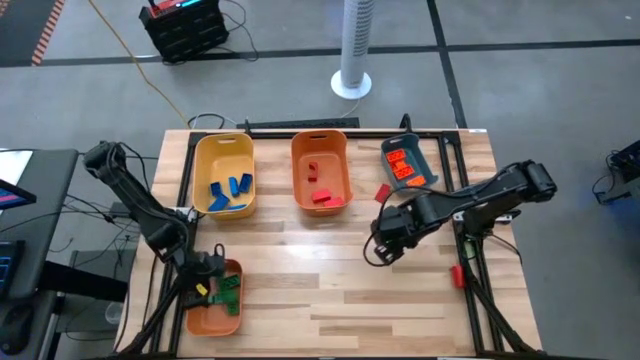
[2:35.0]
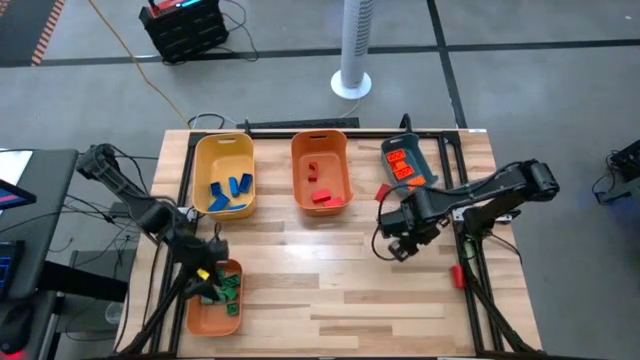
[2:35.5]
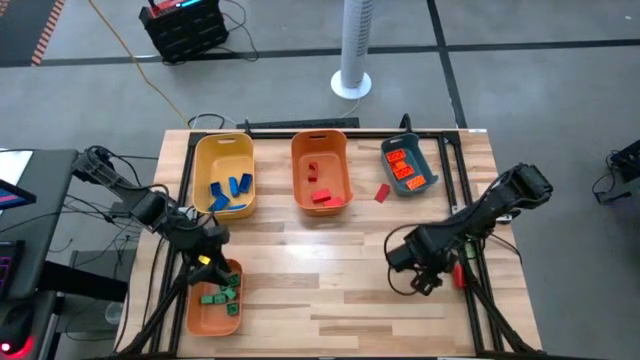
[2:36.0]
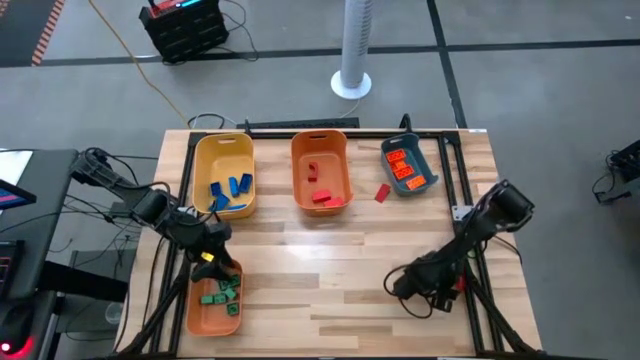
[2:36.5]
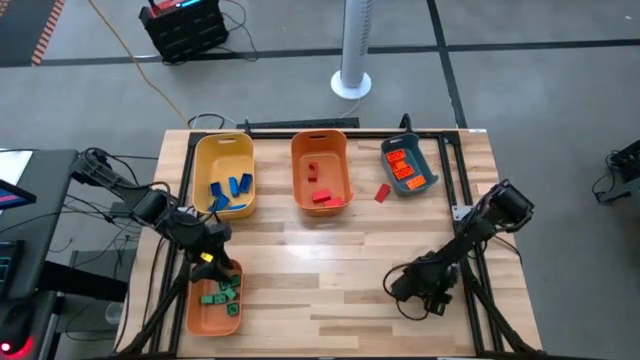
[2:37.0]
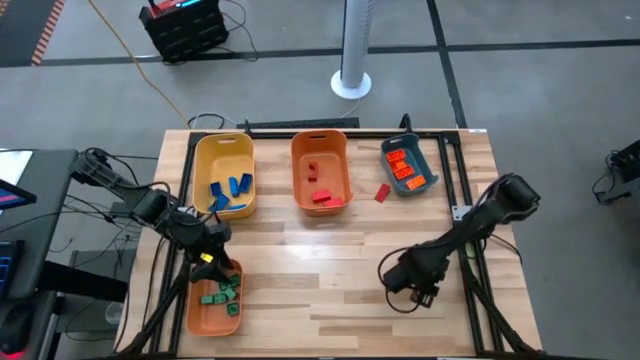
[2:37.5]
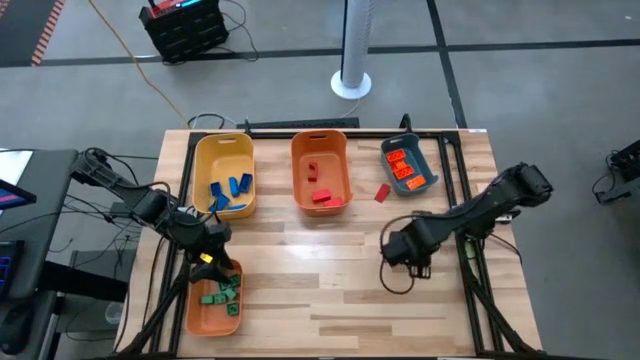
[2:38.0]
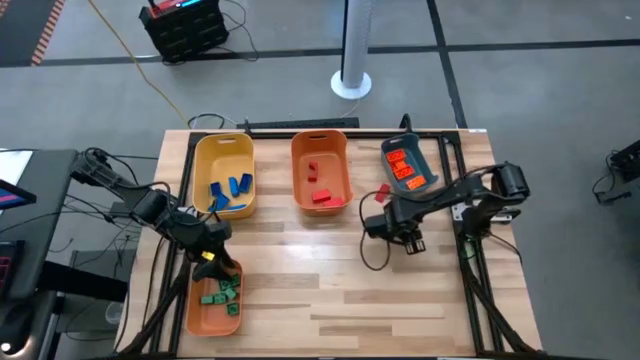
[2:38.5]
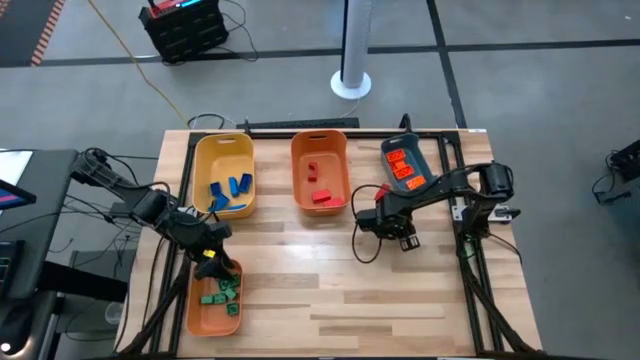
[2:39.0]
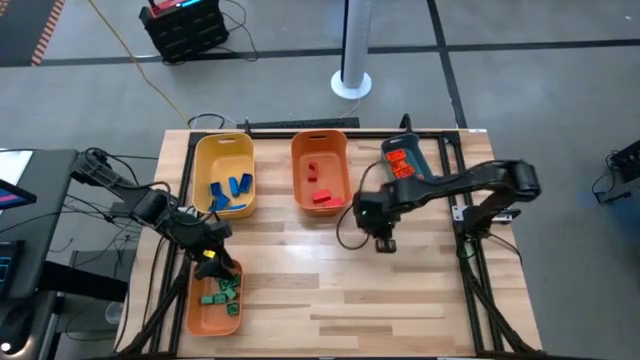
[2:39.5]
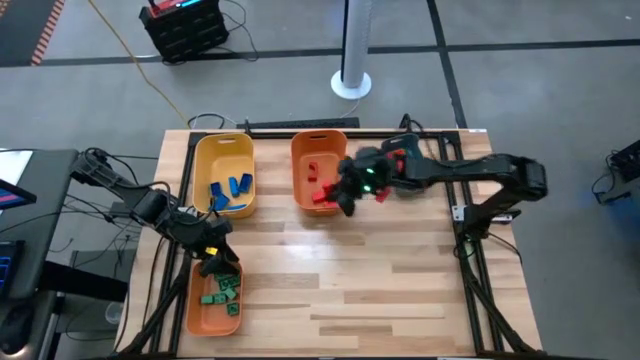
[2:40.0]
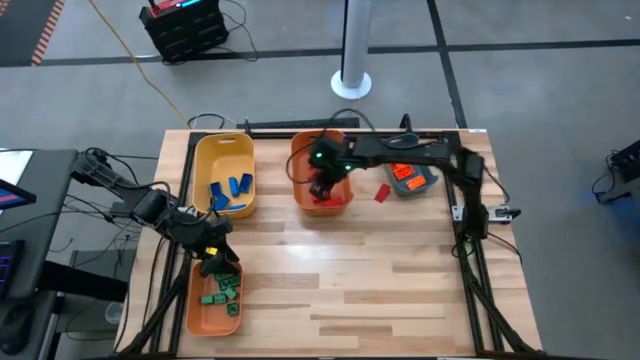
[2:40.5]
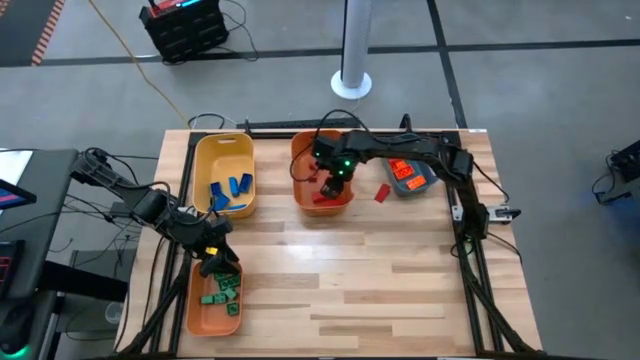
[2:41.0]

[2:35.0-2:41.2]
Task: Sort blocks
Put the red game piece into the top orange bin

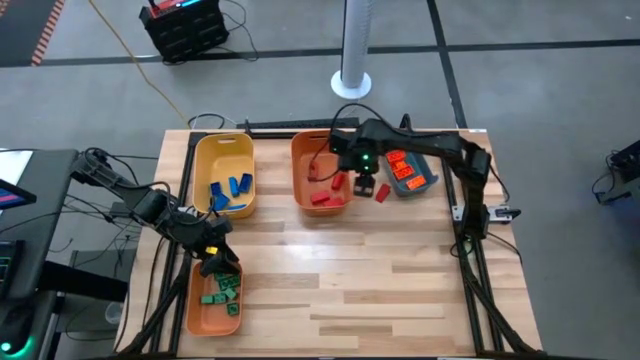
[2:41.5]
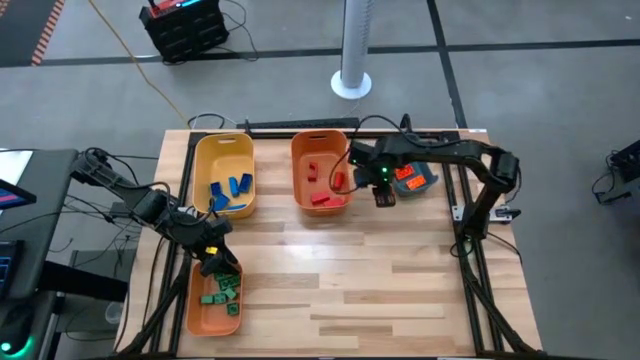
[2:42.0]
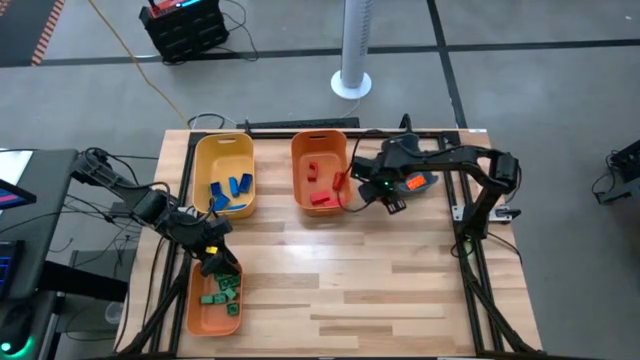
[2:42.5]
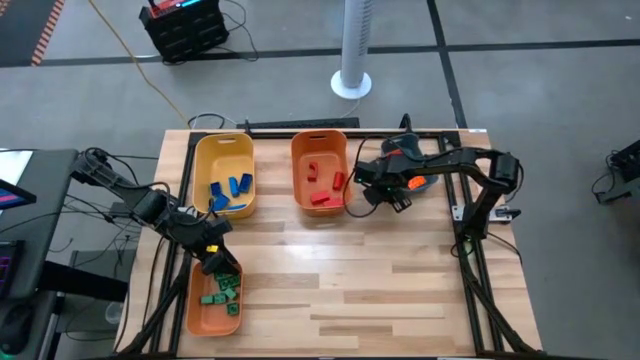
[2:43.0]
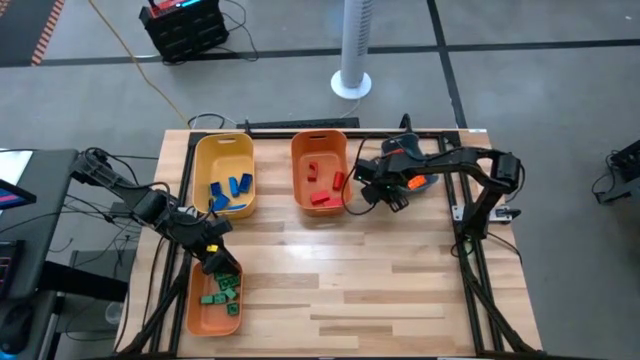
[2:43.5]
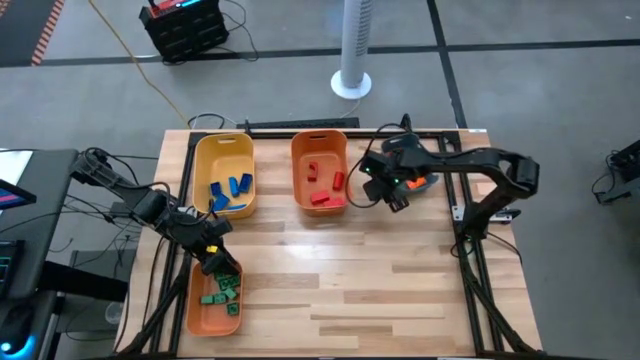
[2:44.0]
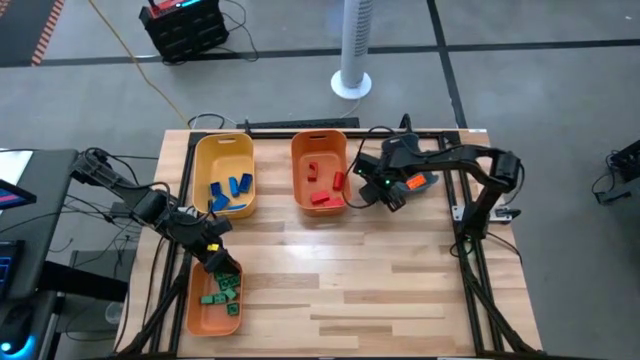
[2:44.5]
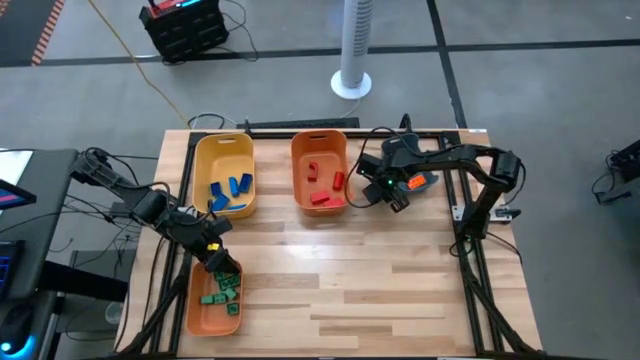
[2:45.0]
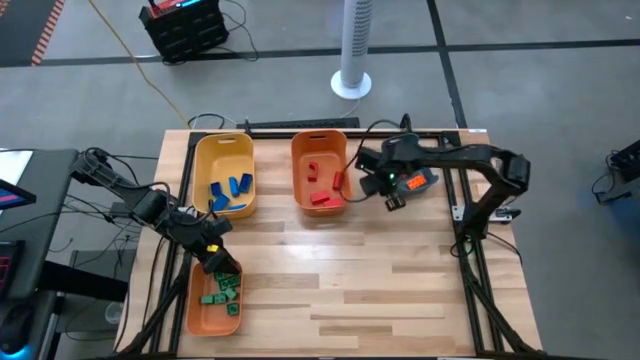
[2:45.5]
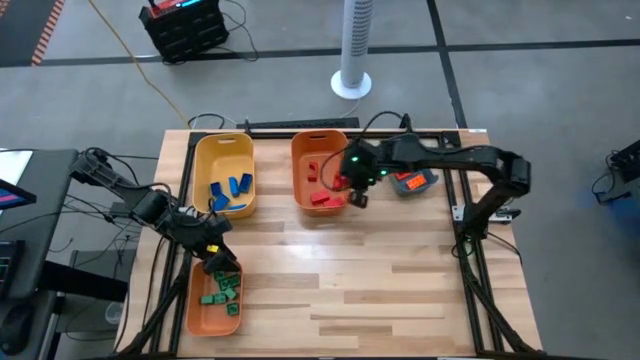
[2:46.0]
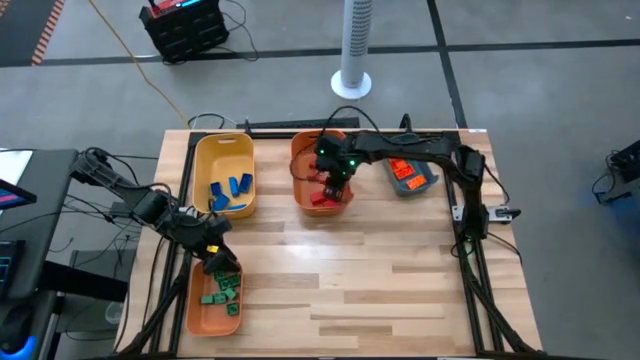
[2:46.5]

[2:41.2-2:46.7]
Put the red game piece into the top orange bin

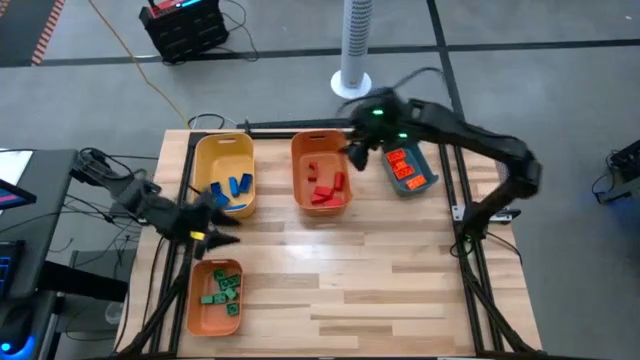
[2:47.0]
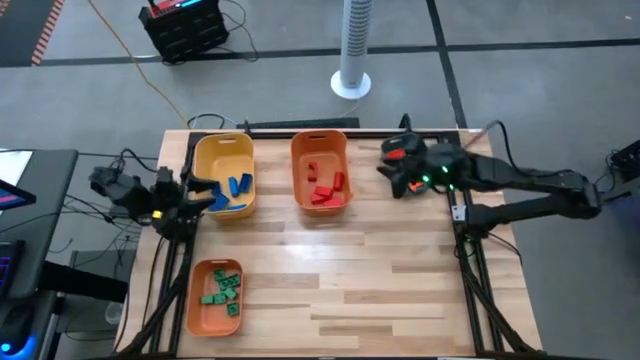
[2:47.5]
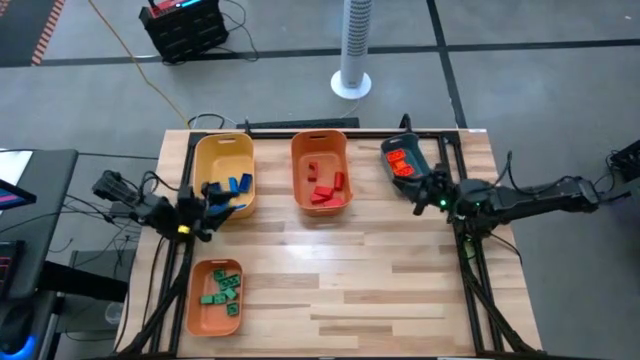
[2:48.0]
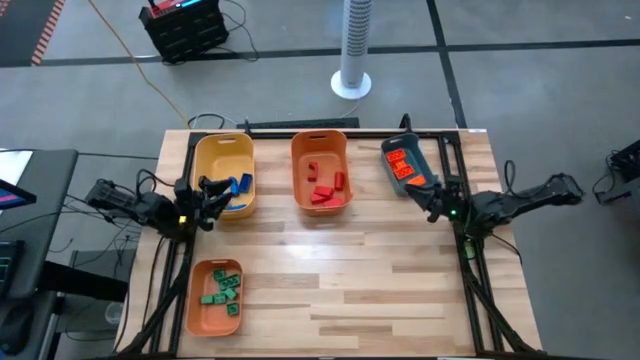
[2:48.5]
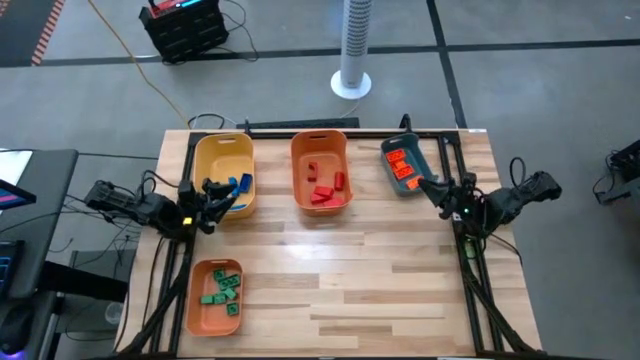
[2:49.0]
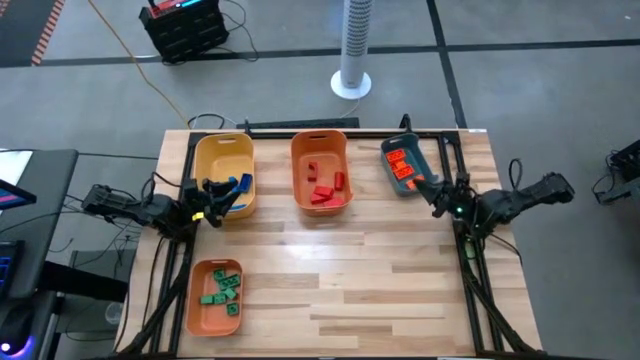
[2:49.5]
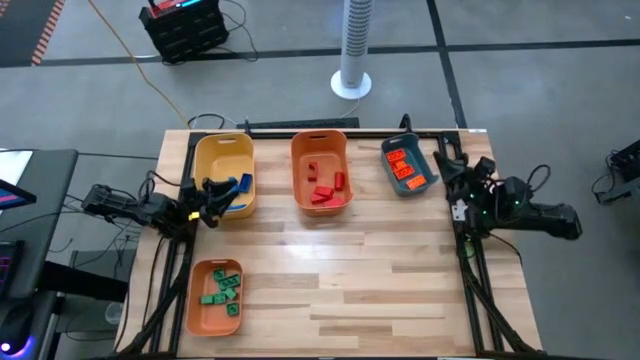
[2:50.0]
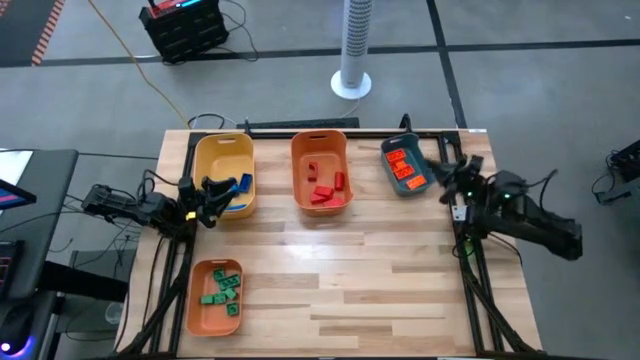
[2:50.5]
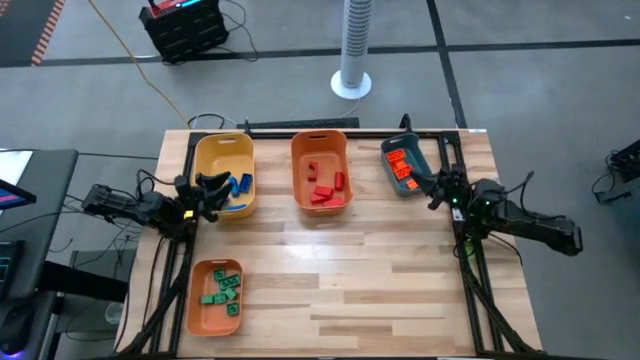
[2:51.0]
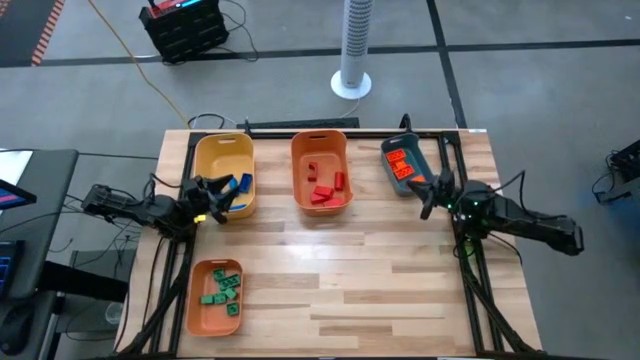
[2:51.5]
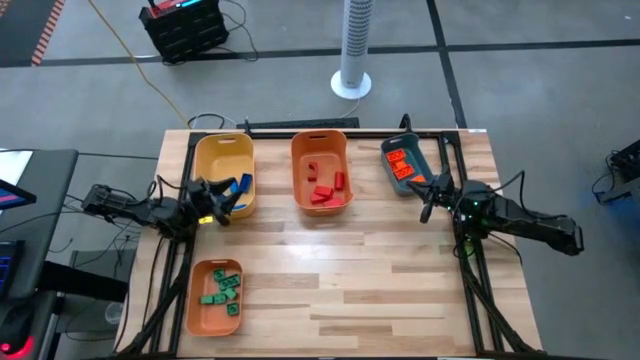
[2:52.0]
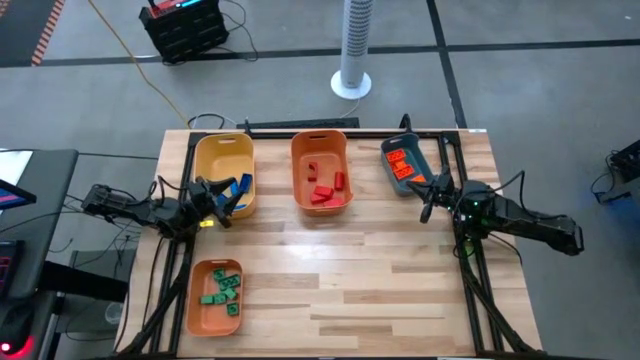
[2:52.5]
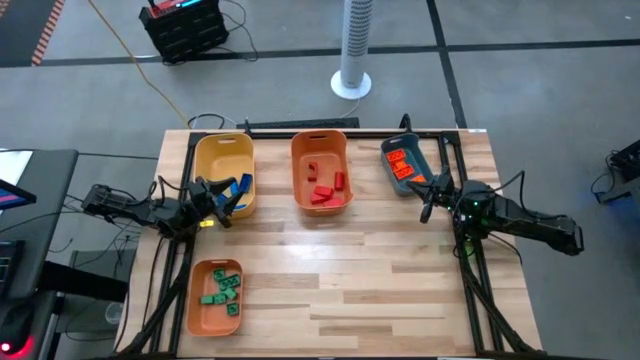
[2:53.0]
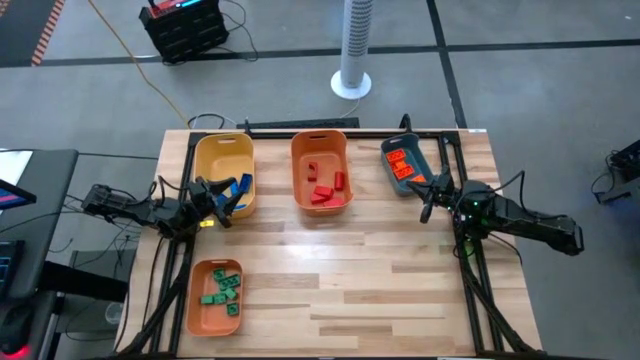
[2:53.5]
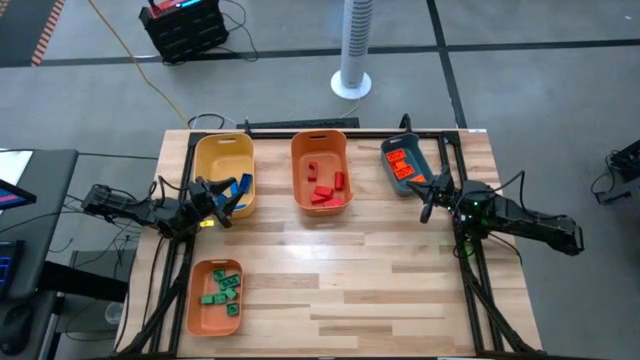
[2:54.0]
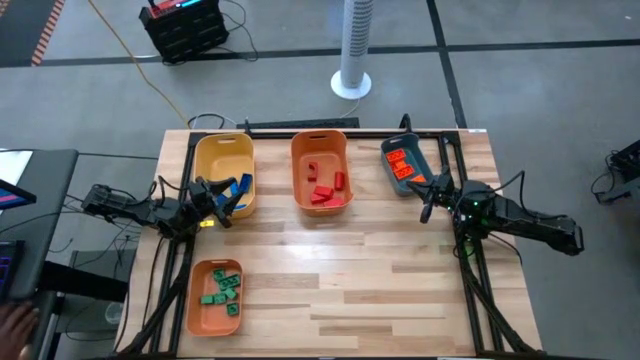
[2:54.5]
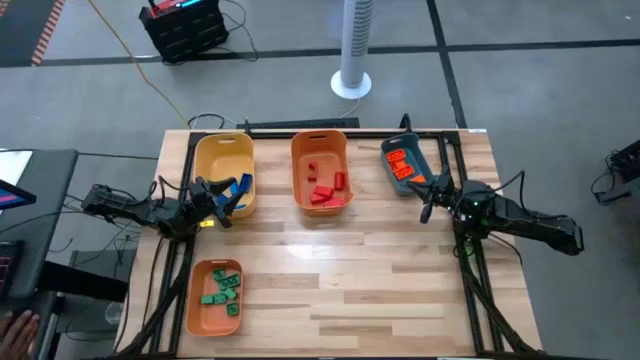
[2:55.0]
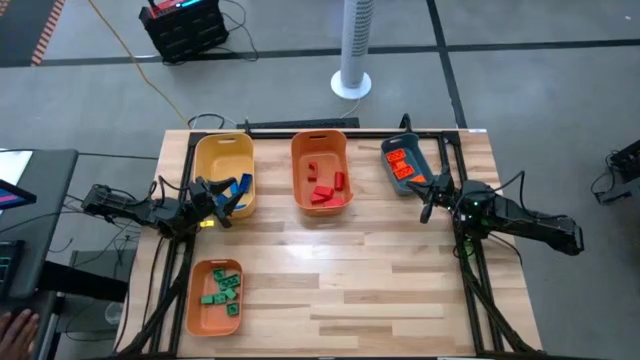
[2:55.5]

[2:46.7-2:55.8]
Return to Home Position

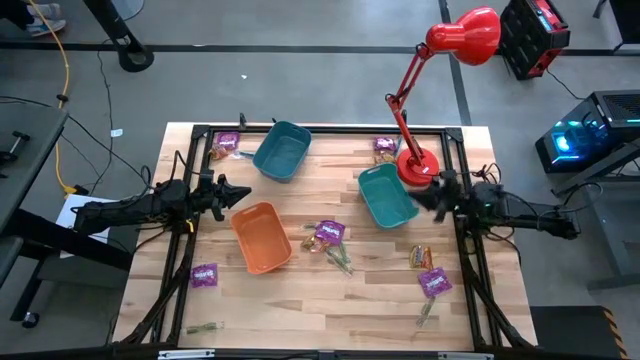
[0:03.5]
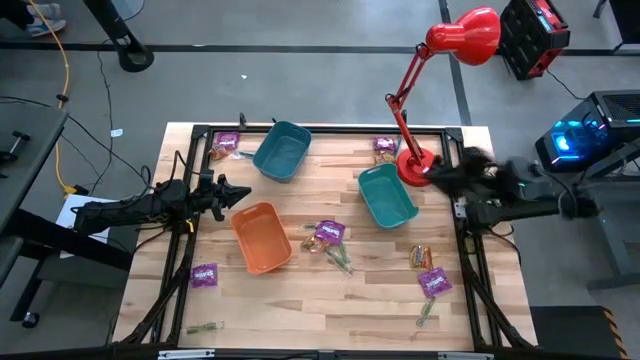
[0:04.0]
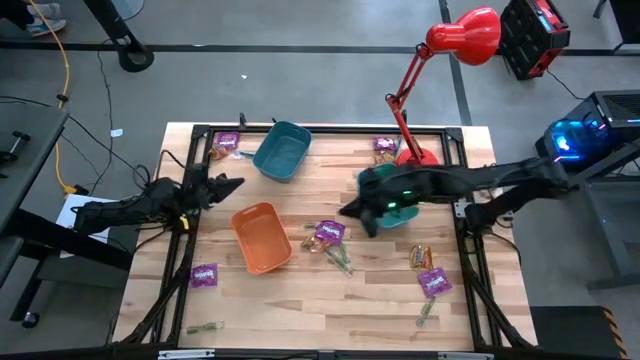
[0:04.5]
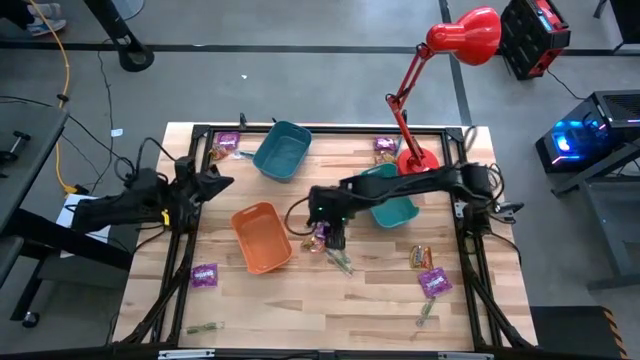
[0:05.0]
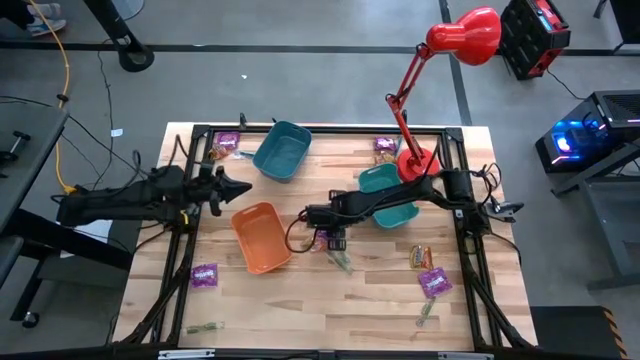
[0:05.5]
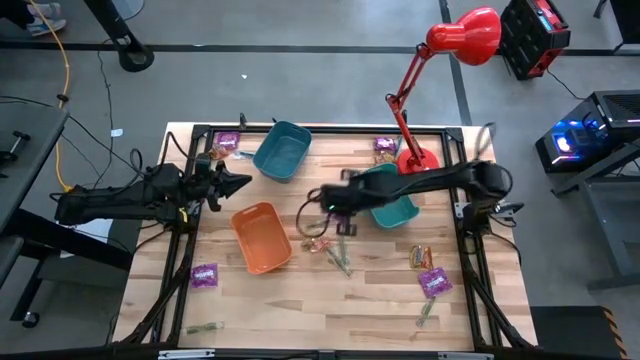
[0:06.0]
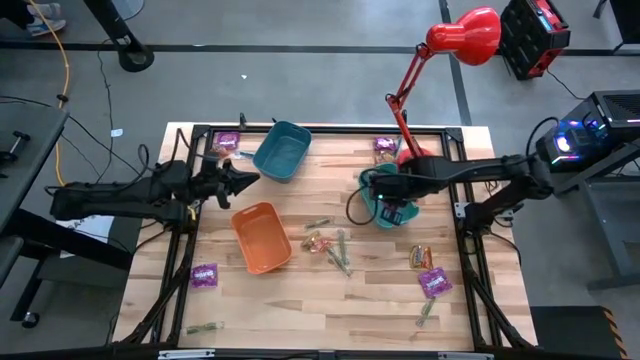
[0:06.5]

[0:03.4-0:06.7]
Task: Sort candy
Put the purple candy into the green bin
